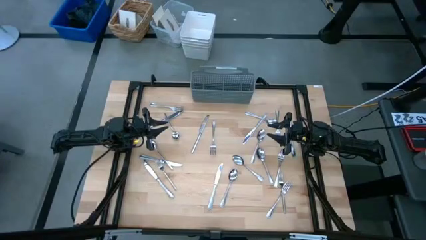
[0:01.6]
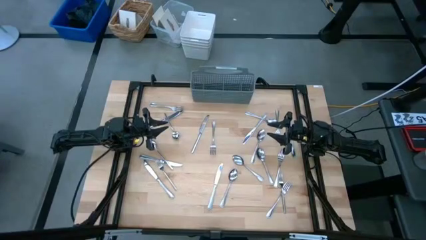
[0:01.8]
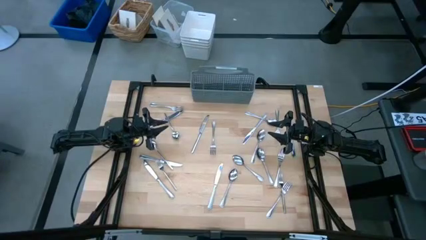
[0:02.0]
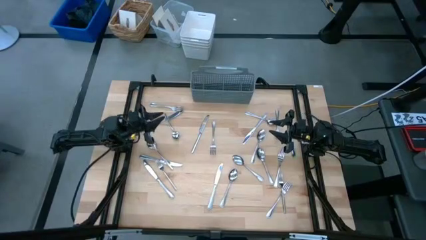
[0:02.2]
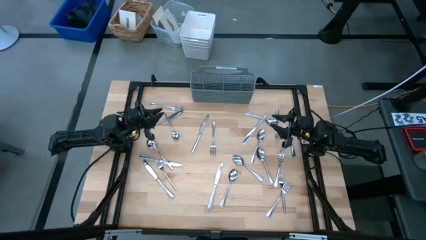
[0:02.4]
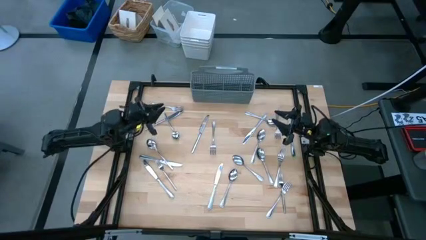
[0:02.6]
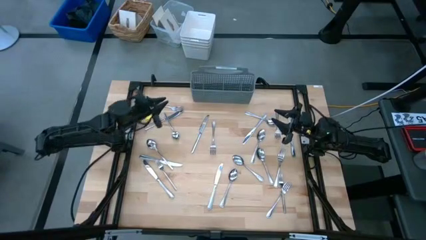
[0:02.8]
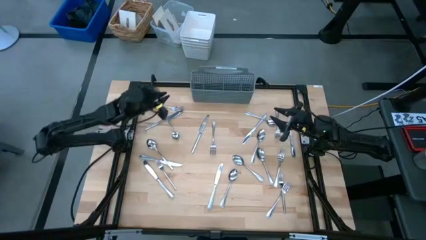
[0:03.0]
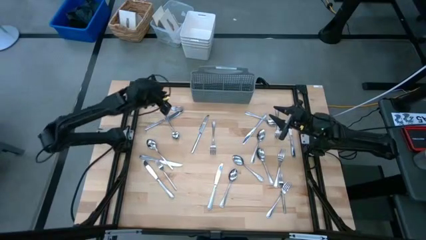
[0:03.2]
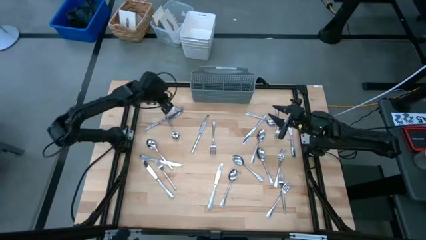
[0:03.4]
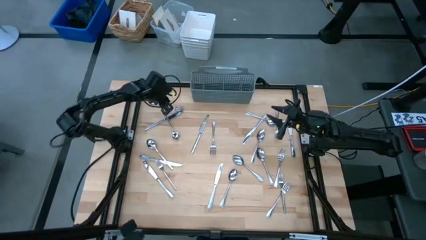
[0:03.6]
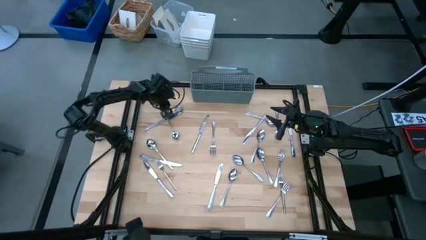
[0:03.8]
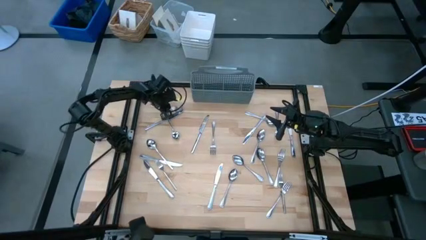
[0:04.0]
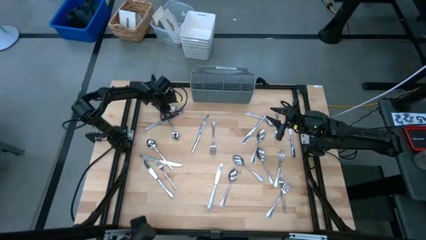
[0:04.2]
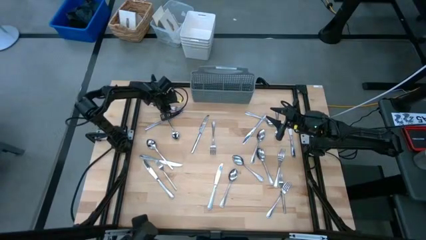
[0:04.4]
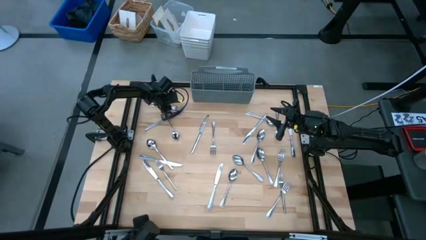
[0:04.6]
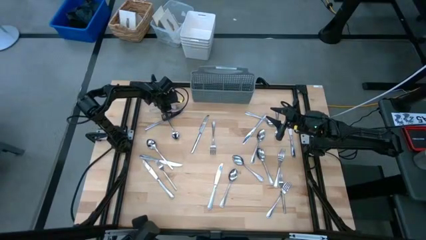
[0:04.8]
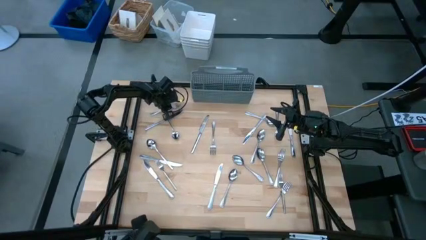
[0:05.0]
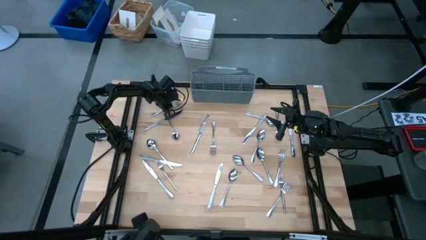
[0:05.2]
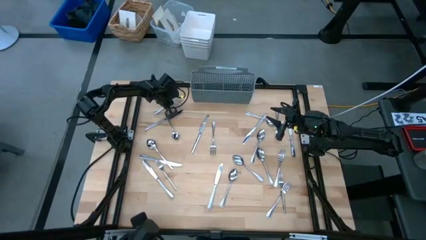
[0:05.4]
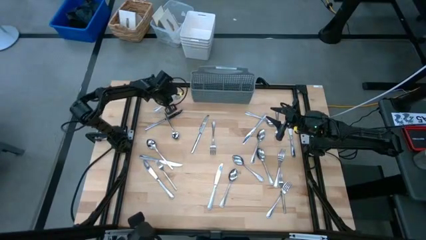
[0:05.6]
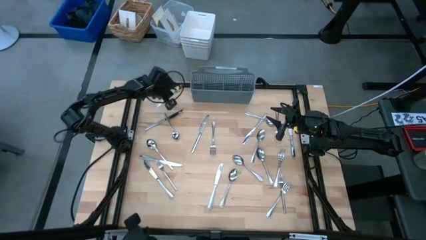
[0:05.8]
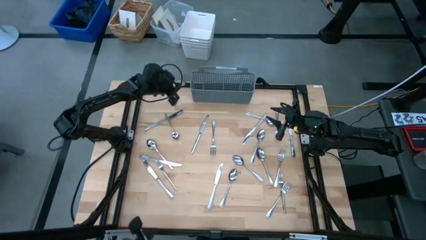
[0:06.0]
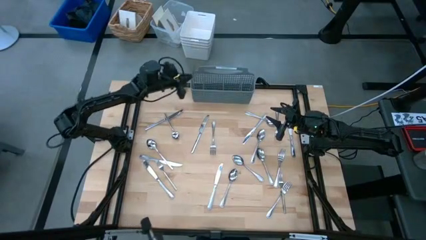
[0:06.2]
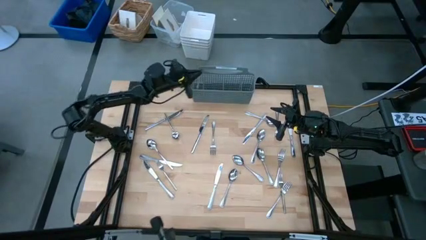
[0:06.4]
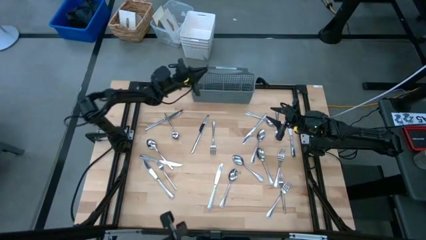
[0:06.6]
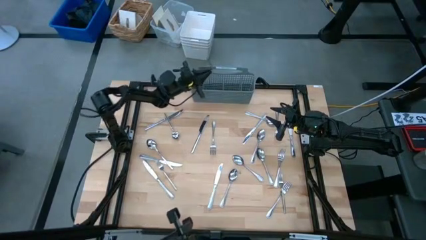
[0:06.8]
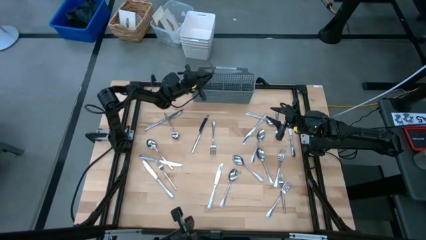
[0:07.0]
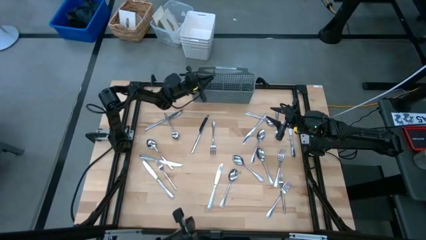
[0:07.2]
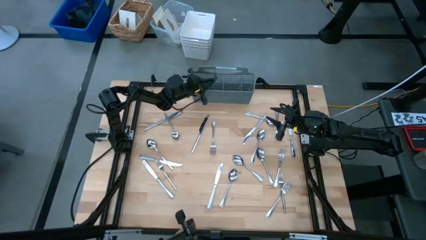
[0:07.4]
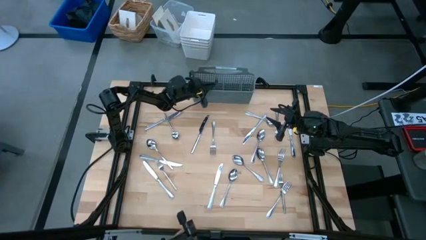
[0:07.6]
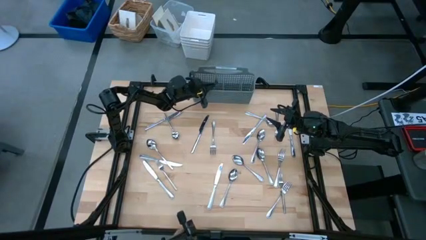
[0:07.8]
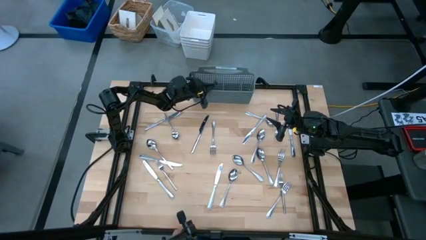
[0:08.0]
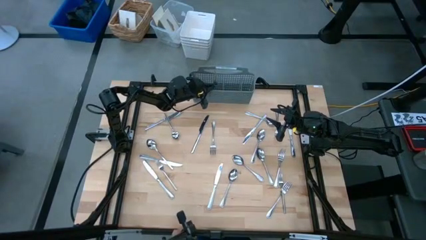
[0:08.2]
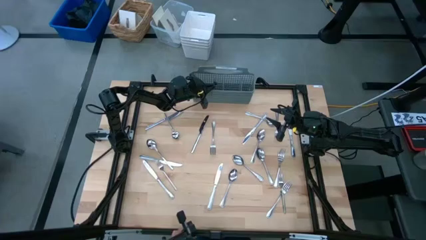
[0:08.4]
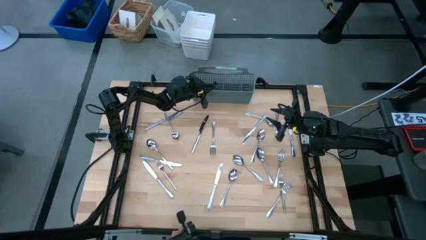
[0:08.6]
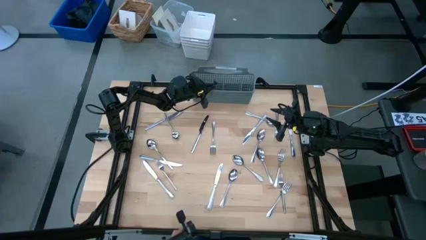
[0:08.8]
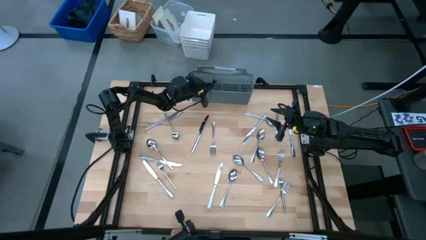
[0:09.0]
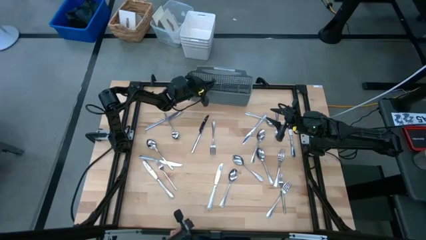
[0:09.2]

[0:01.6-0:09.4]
Task: Sort silverware
Put the fork into the gray silverware organizer

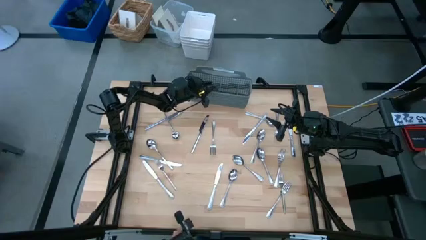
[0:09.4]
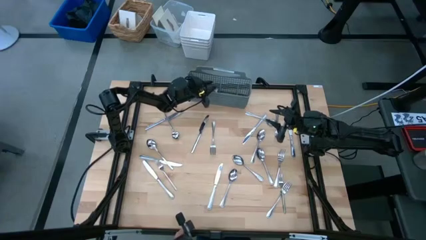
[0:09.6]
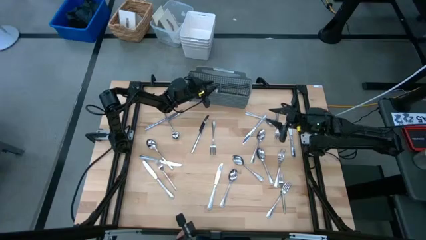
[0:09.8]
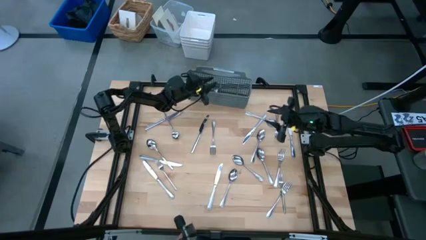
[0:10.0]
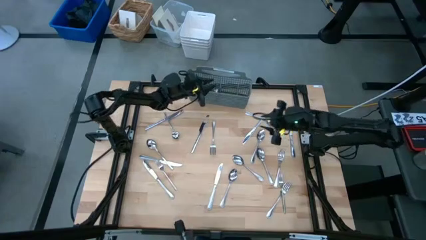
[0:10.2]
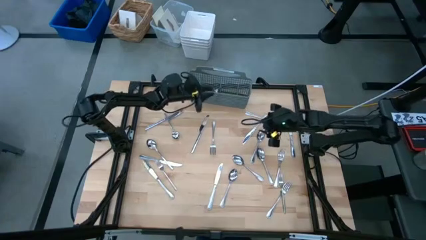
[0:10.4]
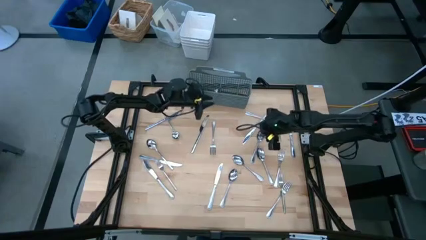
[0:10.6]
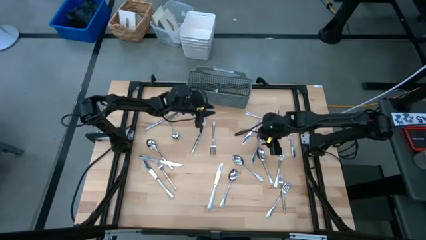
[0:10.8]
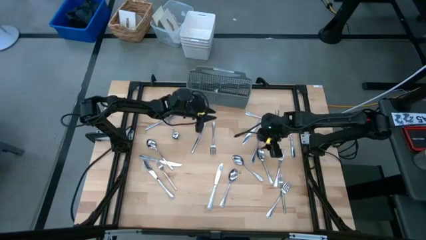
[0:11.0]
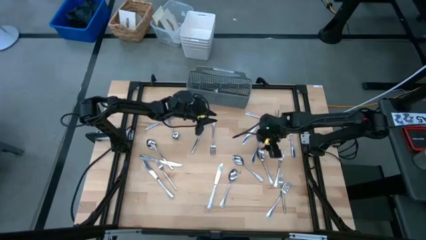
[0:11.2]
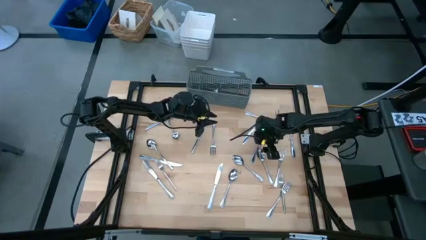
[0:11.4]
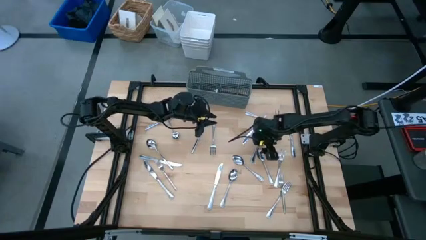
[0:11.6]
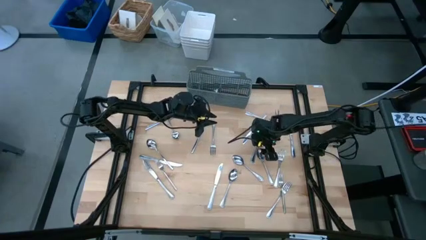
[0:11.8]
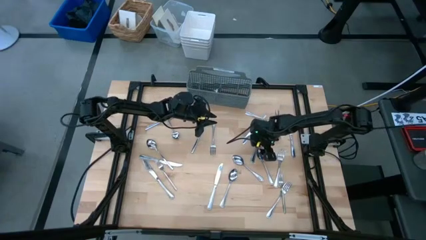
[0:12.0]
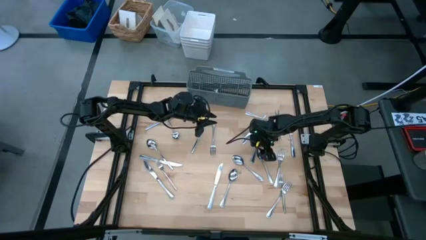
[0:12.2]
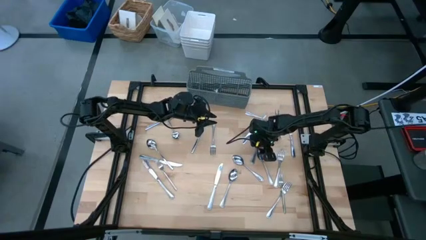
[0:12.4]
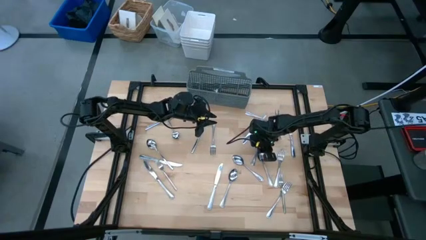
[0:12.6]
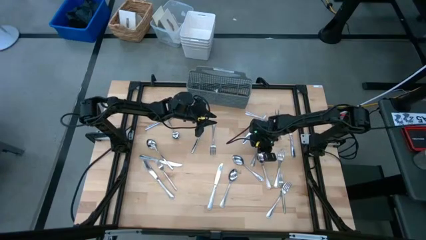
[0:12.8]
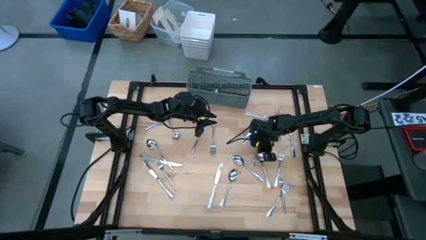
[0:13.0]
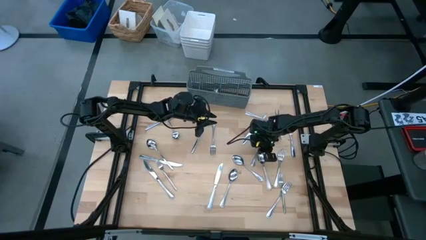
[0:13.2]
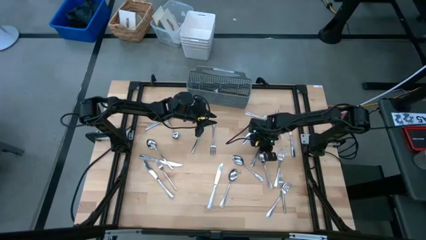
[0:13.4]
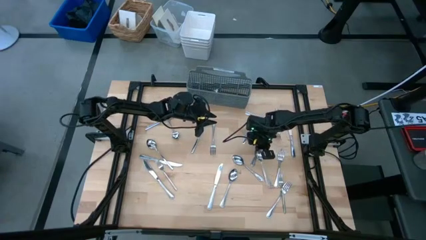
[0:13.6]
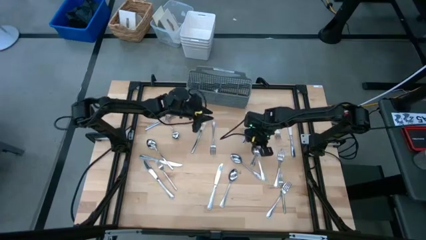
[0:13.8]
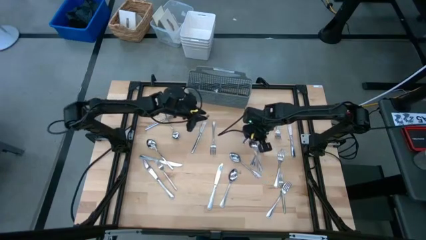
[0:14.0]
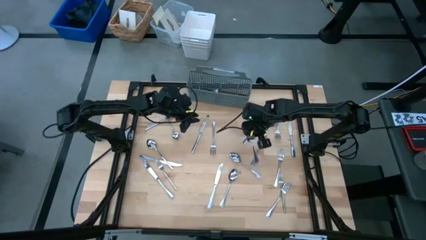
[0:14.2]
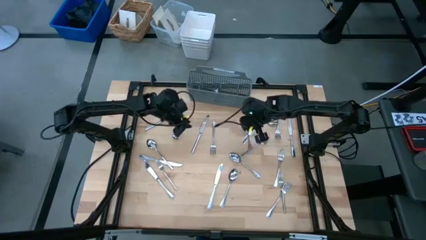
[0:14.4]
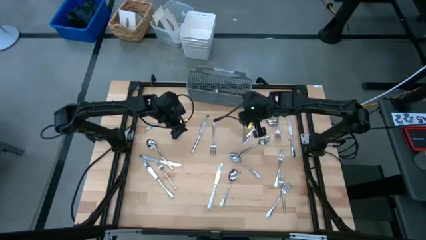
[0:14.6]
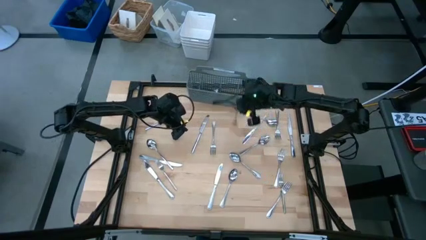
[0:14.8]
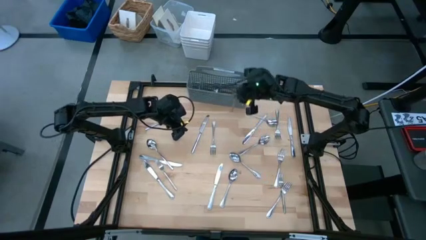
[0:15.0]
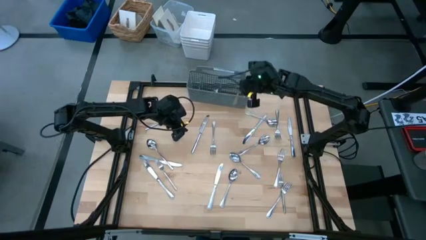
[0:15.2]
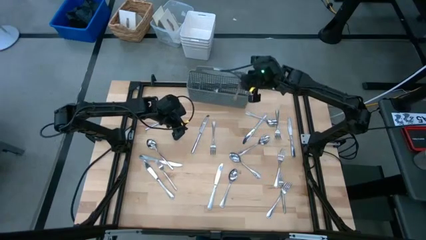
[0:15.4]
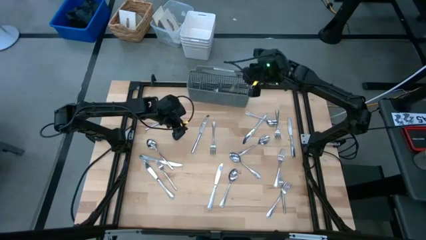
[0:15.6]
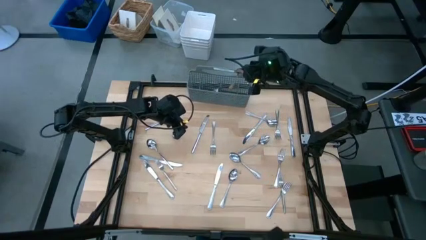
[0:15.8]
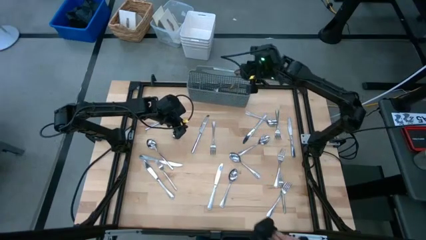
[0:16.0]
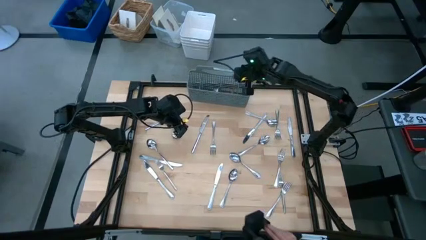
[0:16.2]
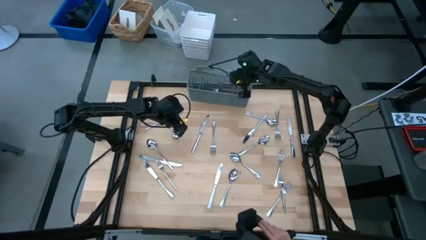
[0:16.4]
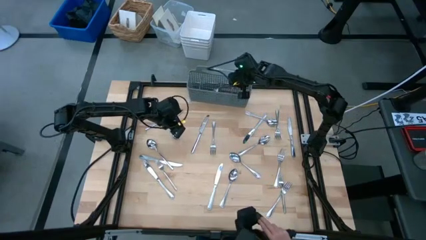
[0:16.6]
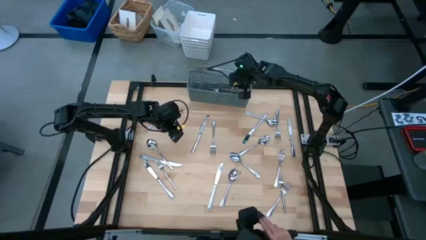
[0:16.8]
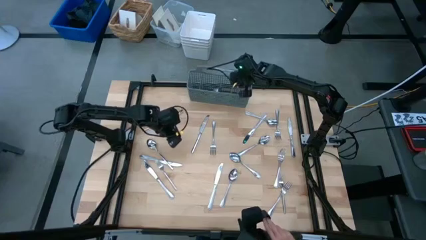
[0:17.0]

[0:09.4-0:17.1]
Put the spoon into the gray silverware organizer
